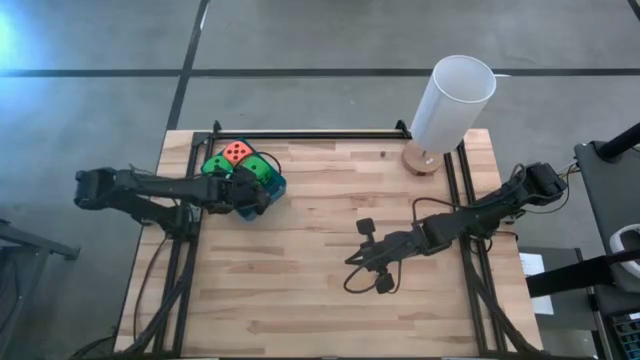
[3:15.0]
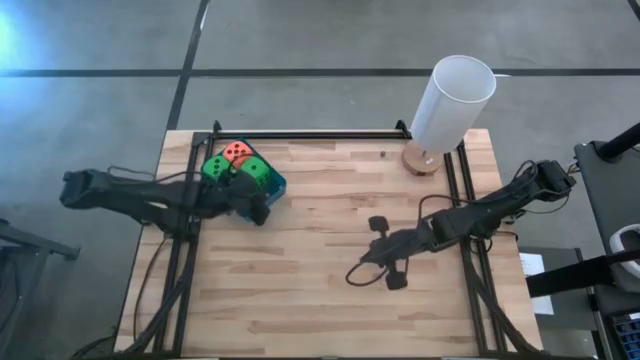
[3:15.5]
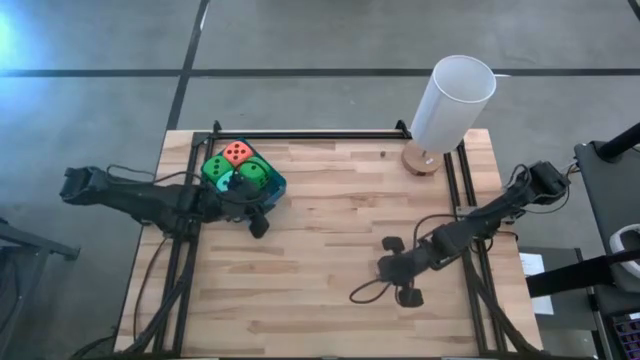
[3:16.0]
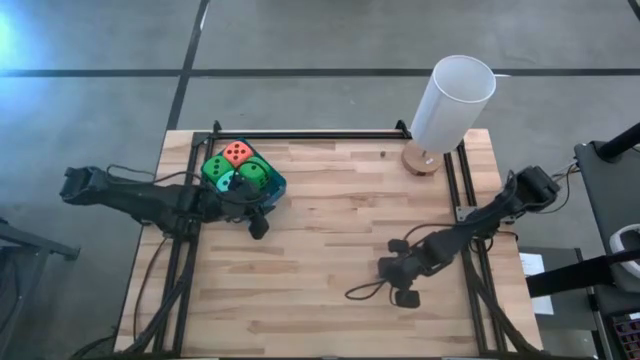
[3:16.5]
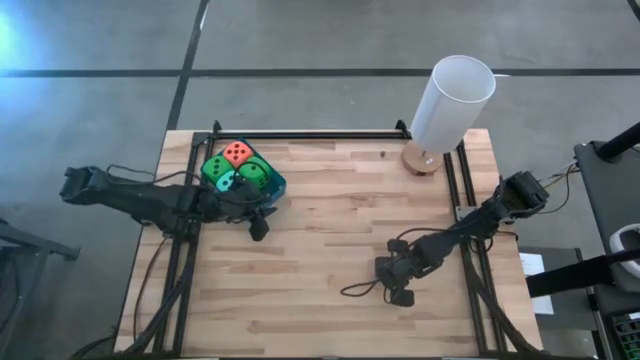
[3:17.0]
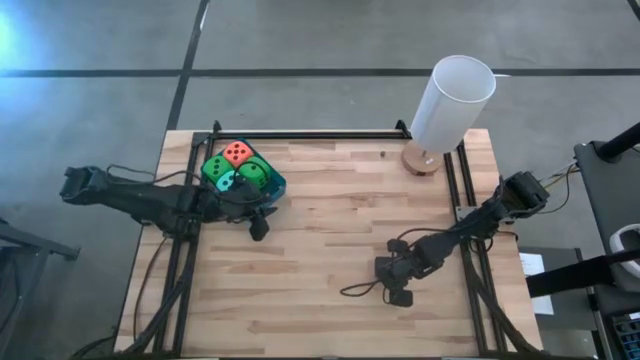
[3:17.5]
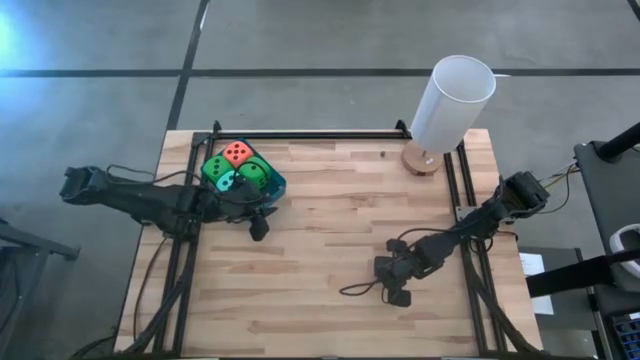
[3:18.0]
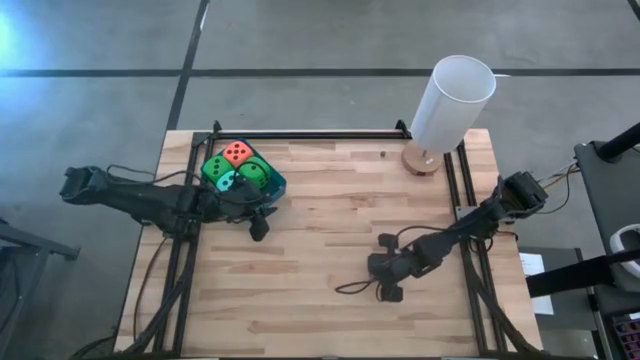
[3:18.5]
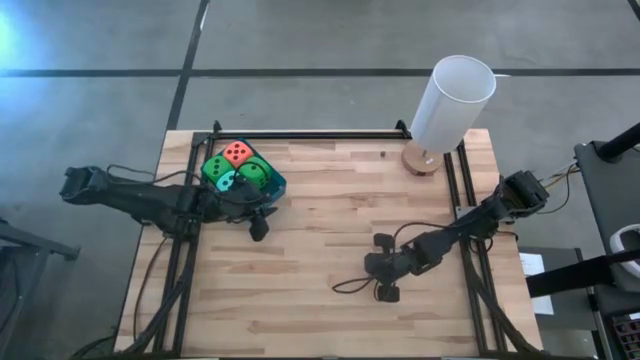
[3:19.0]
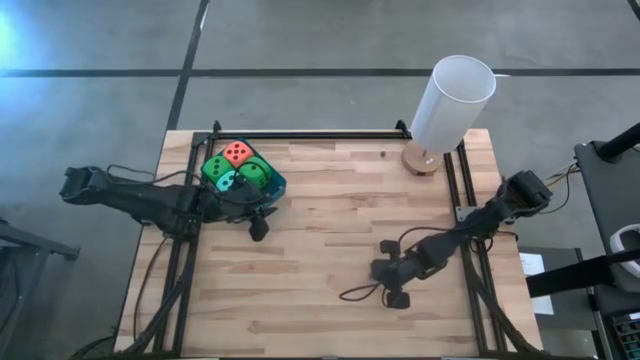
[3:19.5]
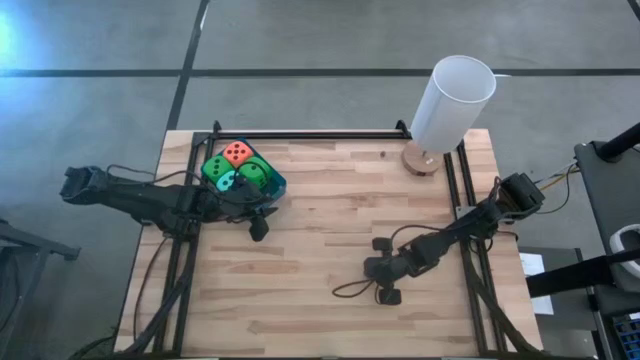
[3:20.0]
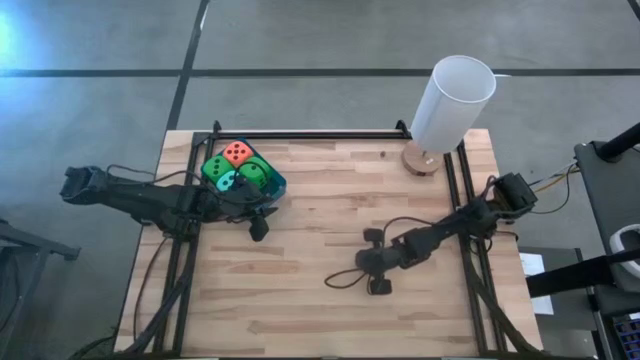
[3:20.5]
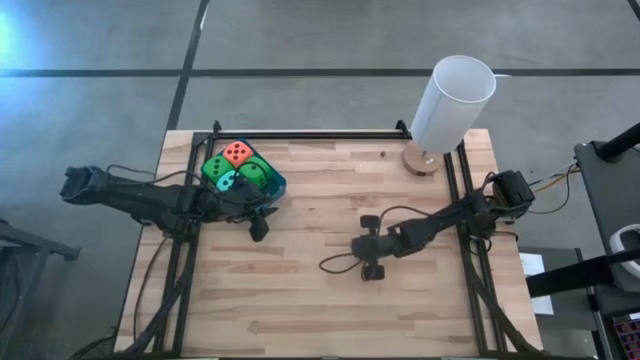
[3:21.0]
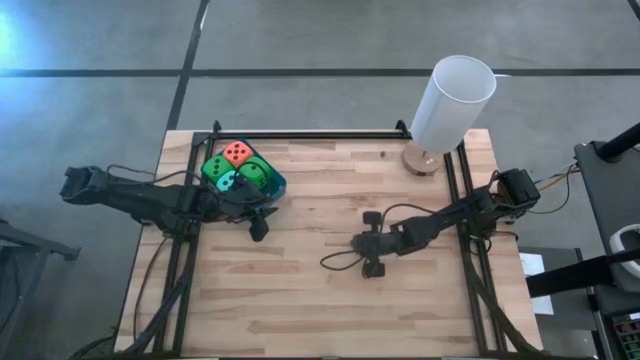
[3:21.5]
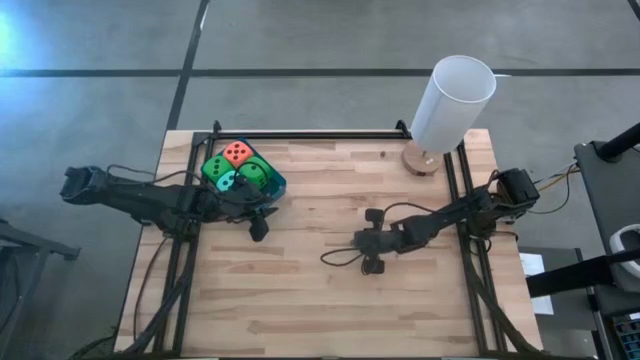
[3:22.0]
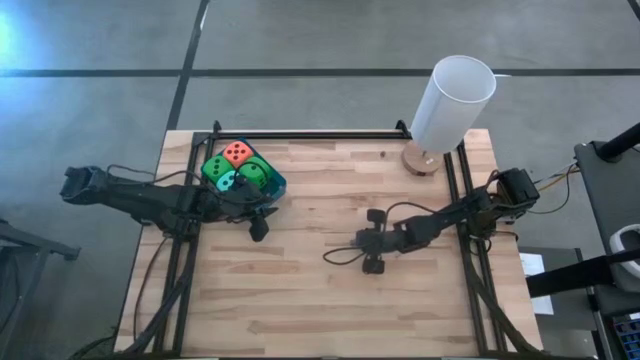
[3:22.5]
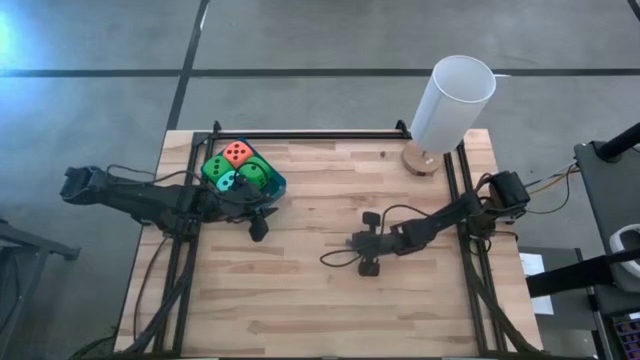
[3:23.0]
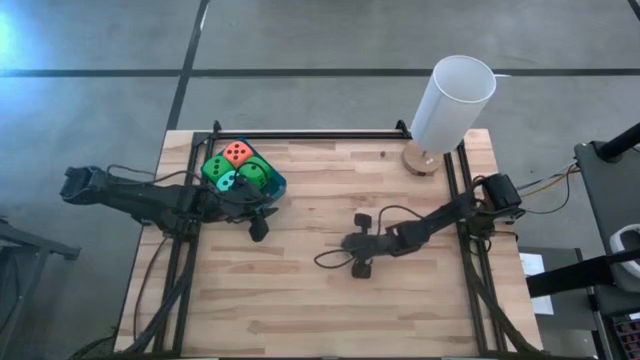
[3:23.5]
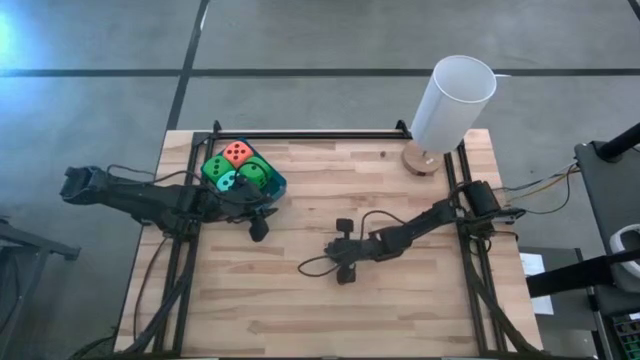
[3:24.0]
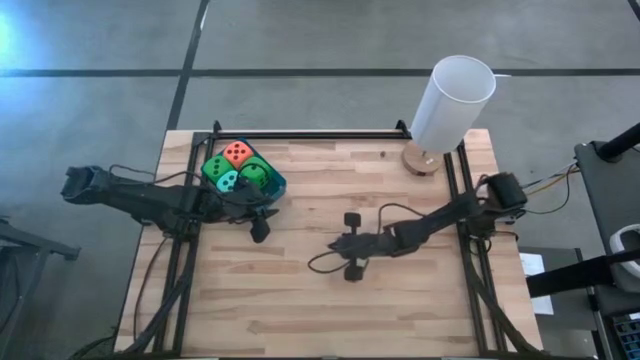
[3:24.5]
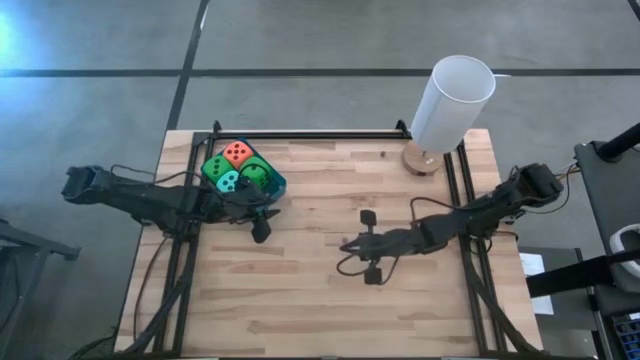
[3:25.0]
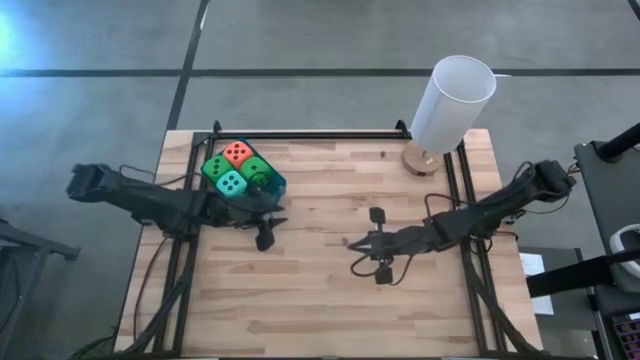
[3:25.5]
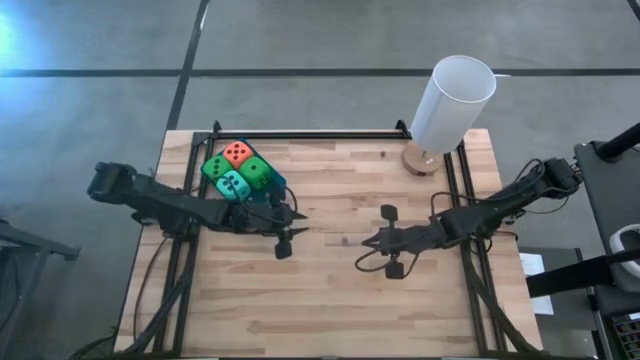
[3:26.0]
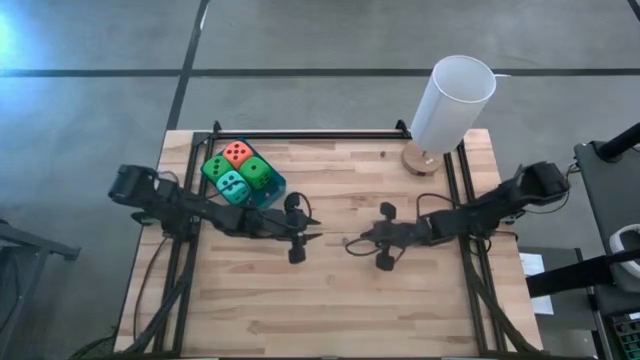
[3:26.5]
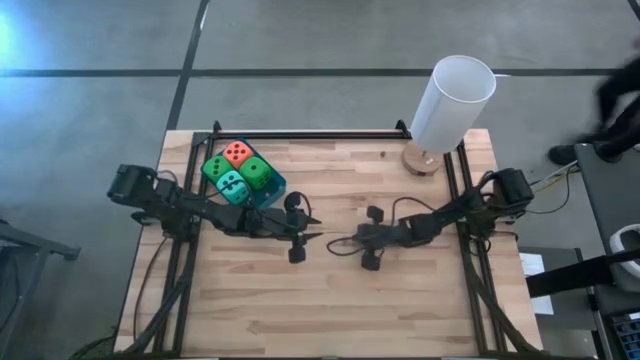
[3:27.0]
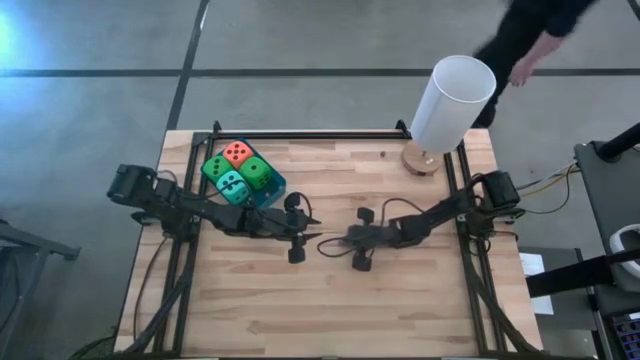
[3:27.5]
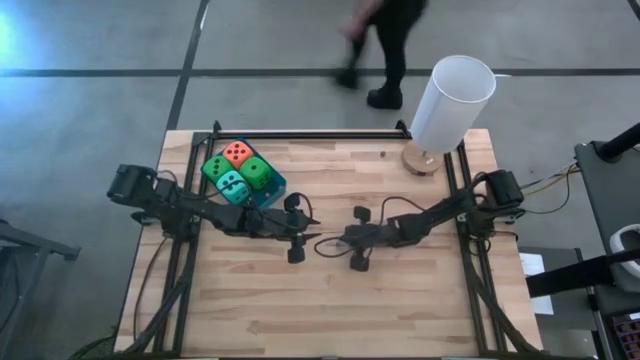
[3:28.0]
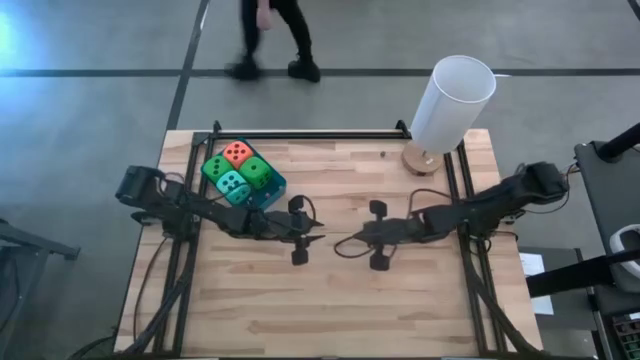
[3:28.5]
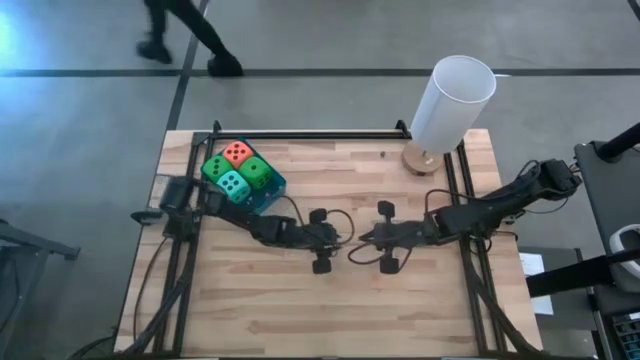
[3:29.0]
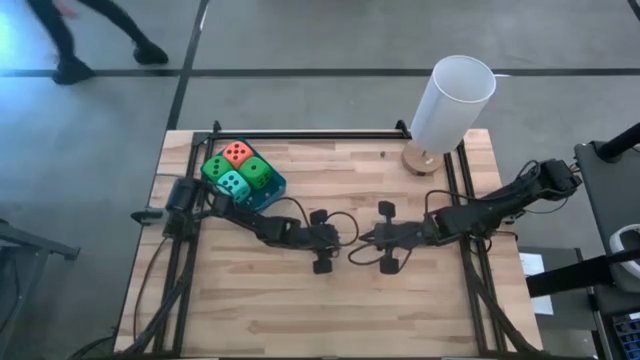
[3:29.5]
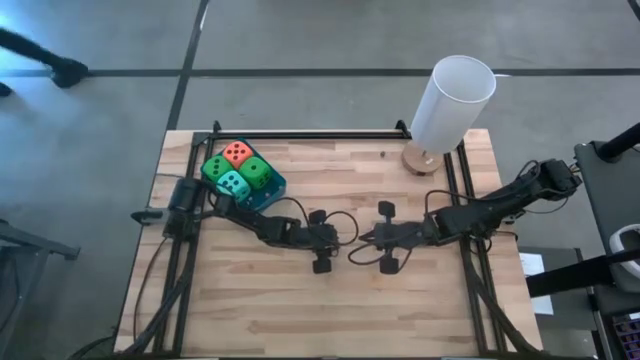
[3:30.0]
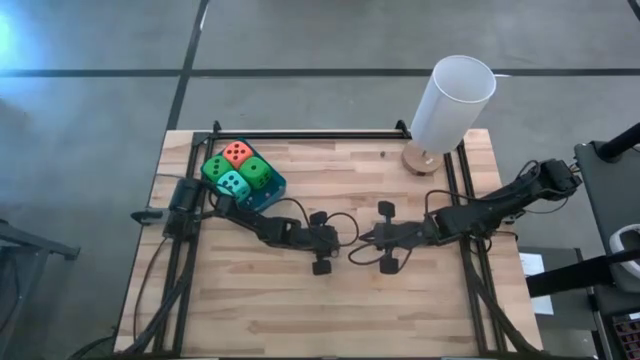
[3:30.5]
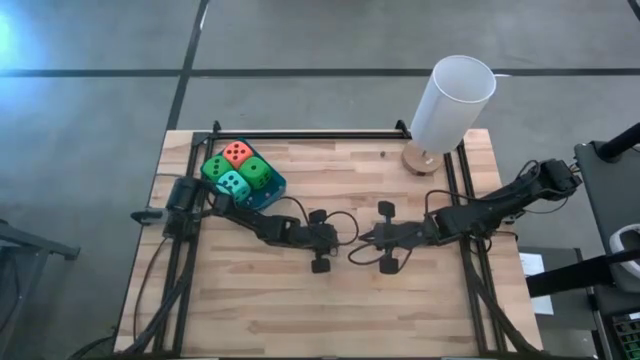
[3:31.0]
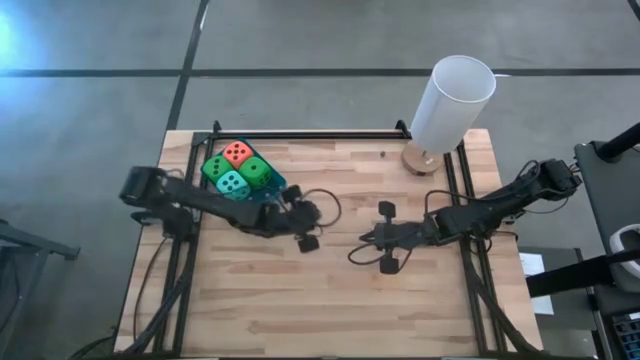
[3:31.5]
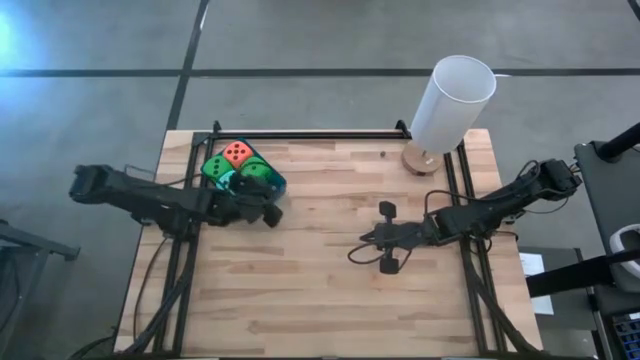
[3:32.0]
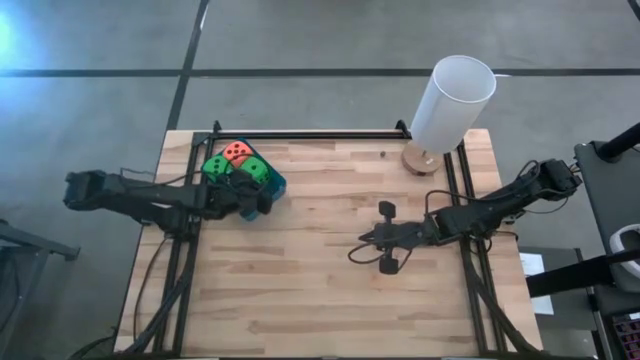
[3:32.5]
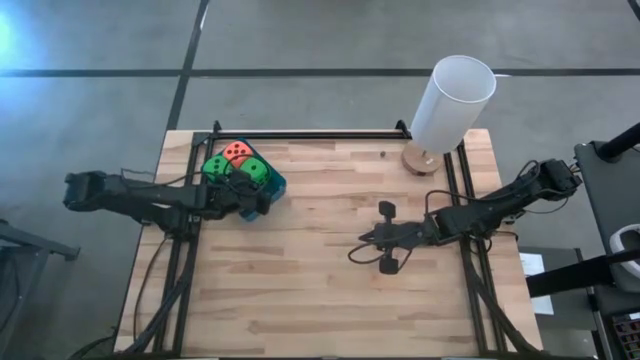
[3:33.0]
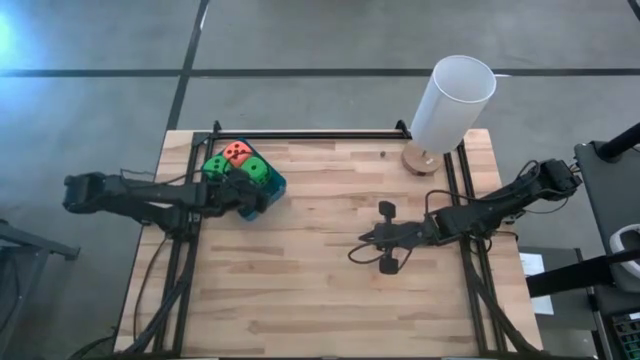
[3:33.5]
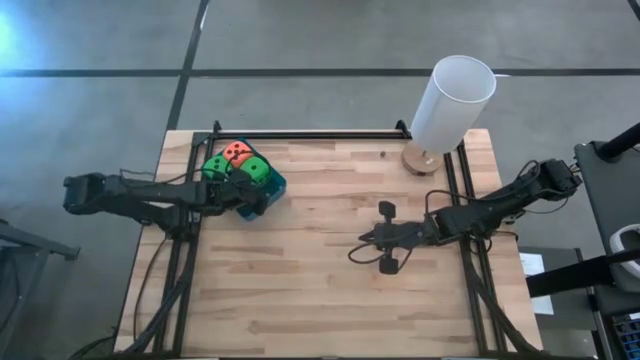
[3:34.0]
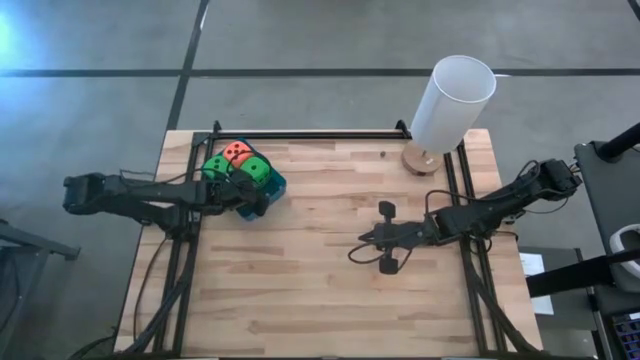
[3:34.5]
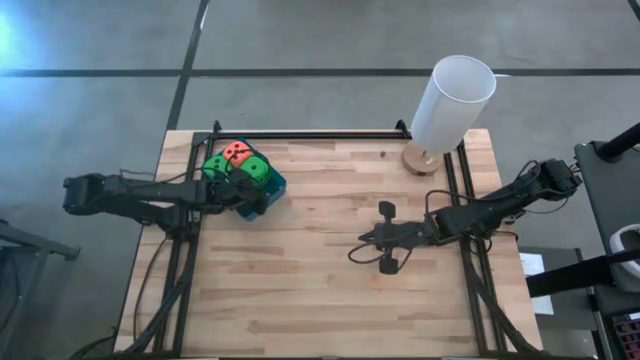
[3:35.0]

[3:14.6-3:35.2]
Task: Pick & Place Dice
Put the small blue dice into the blue bin

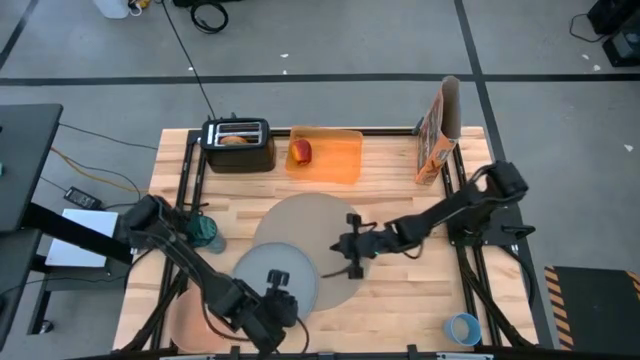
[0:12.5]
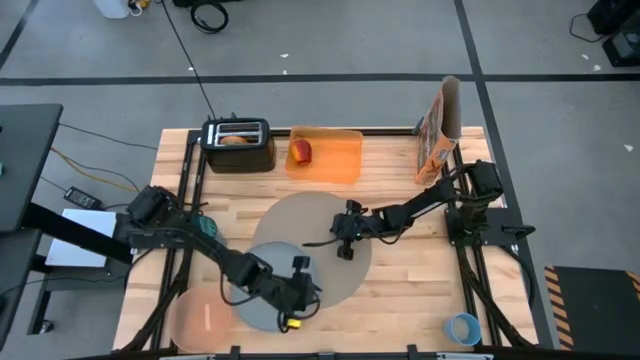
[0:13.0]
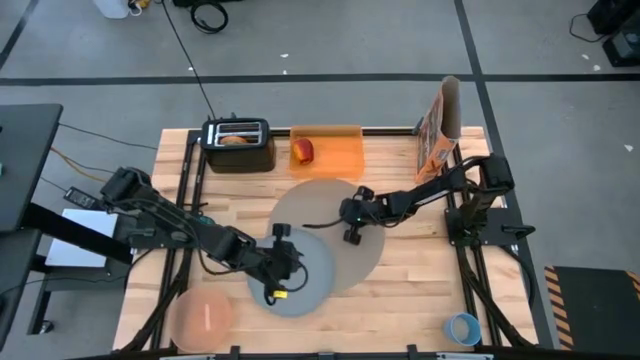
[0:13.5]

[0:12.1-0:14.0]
Task: Arrange a breakfast setting
Adjust the brown tablemat
